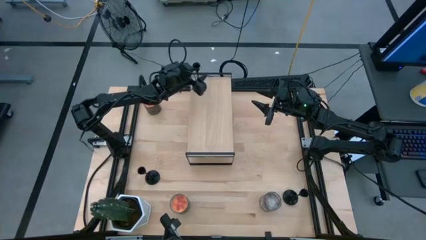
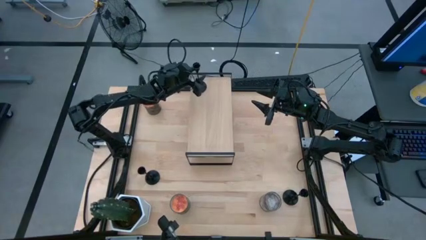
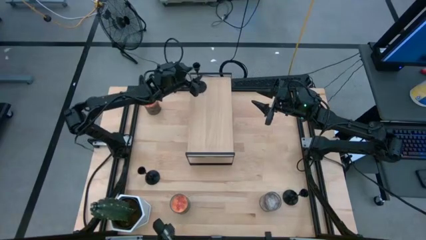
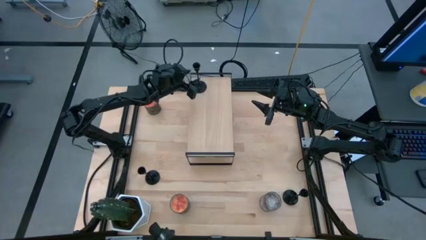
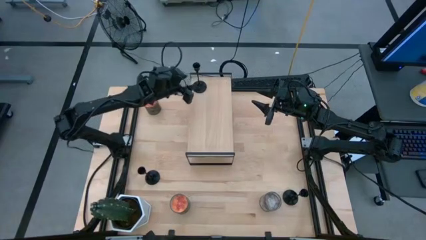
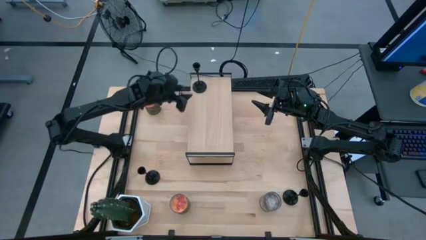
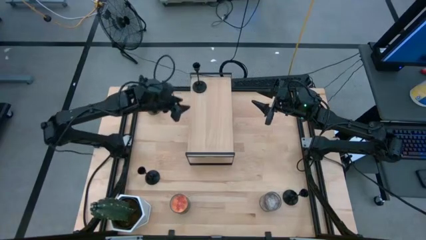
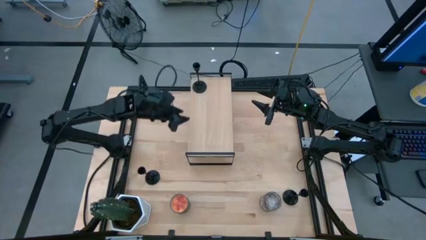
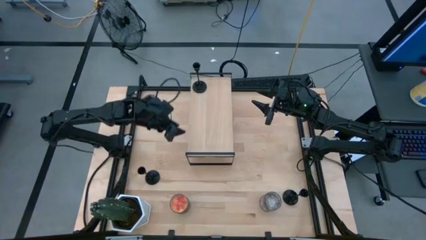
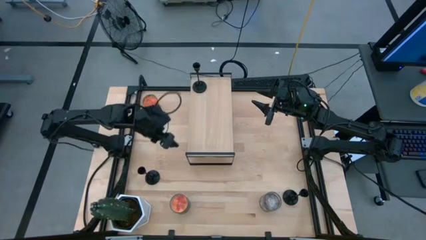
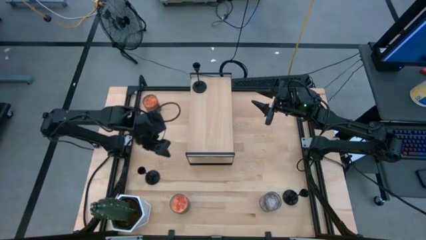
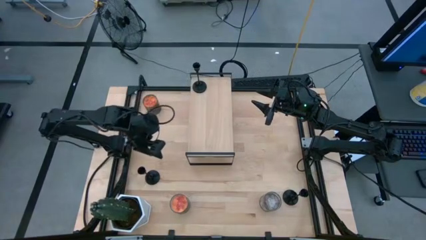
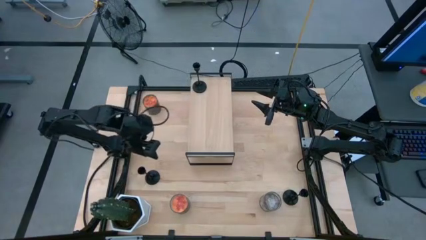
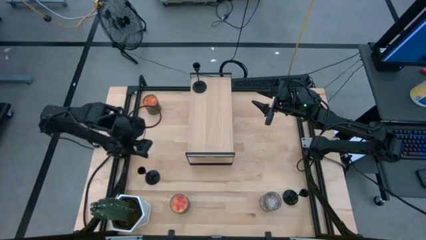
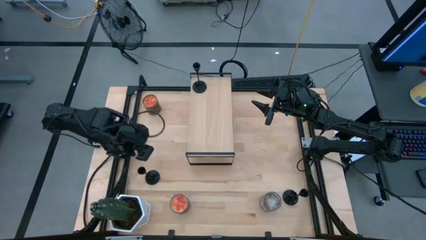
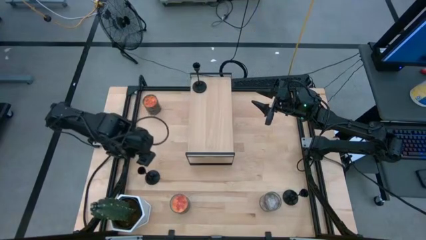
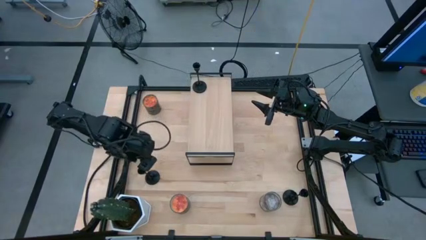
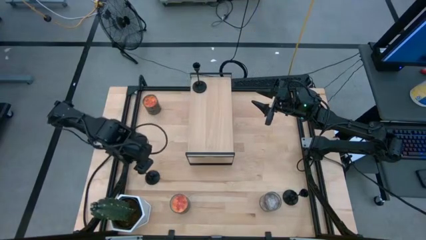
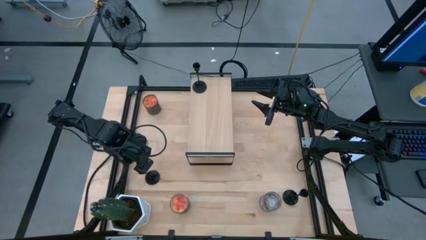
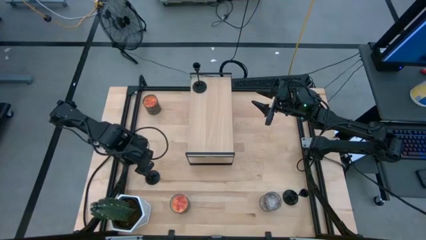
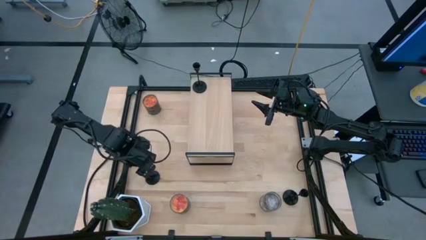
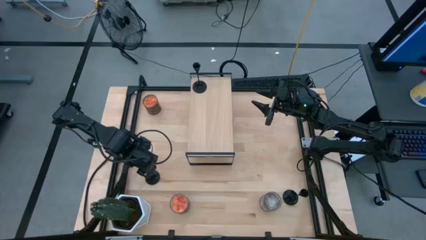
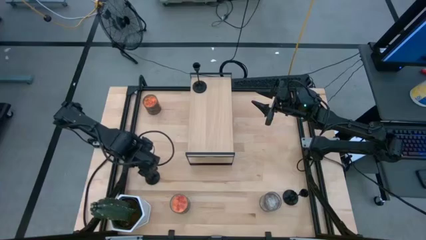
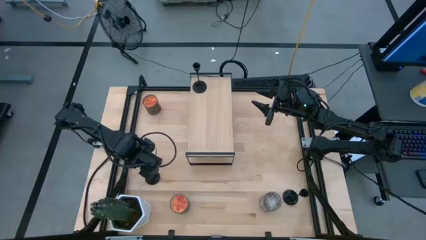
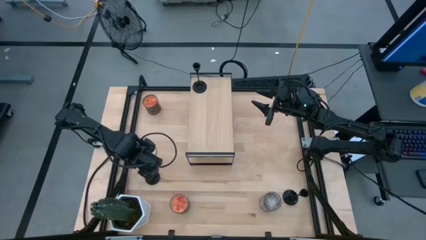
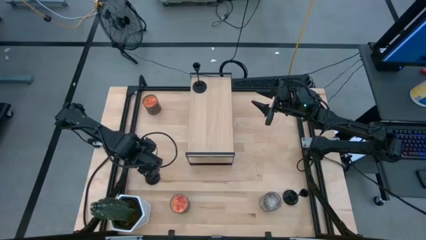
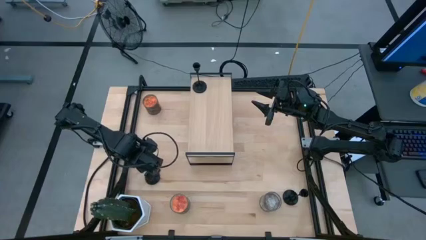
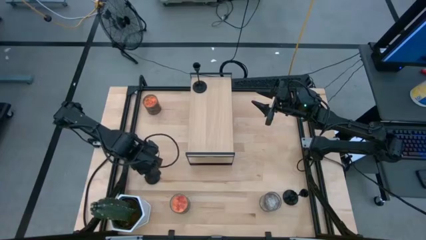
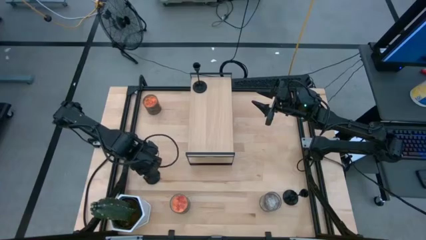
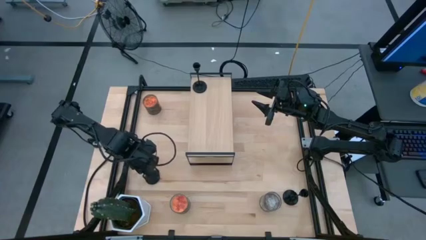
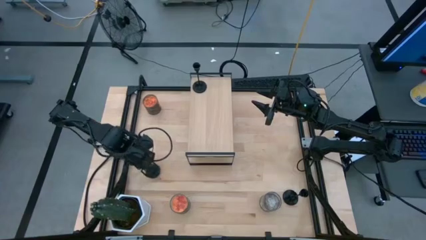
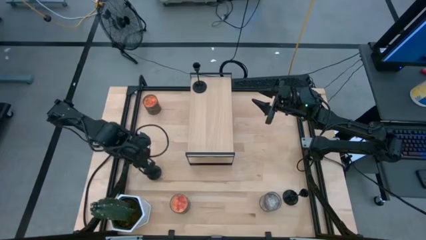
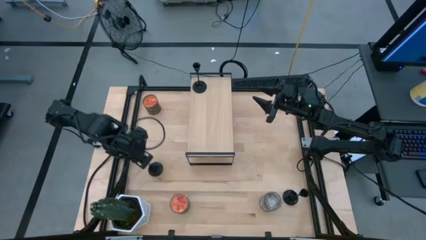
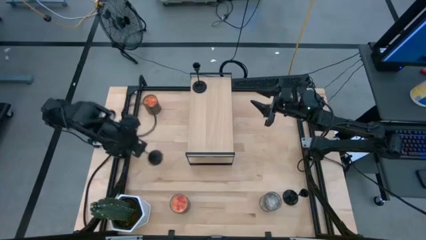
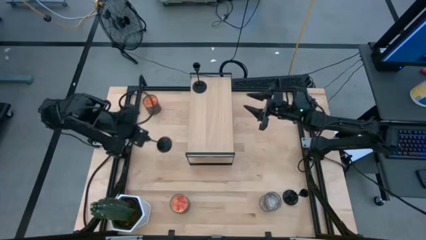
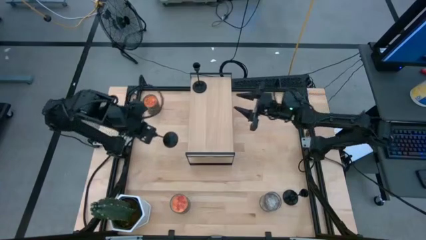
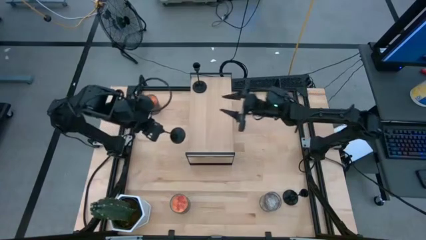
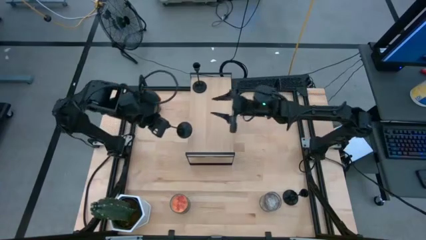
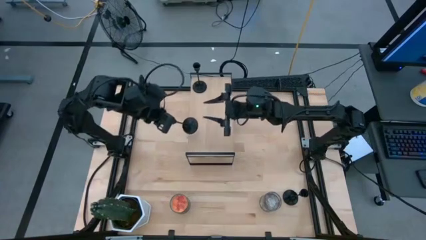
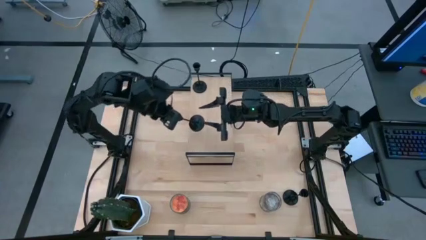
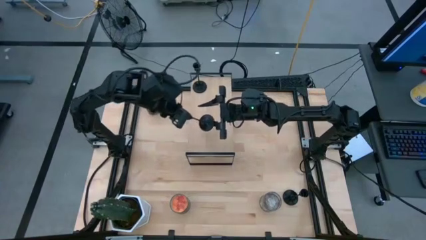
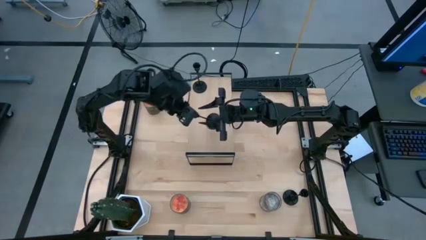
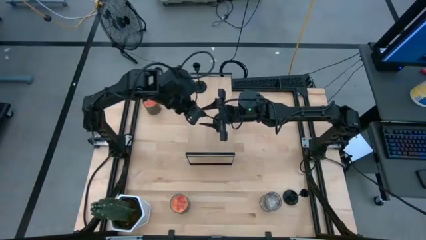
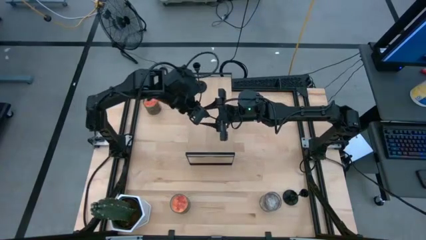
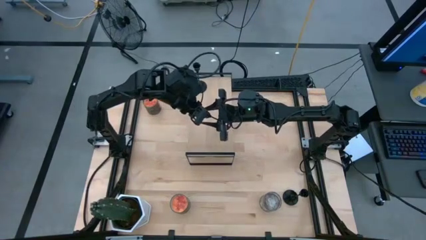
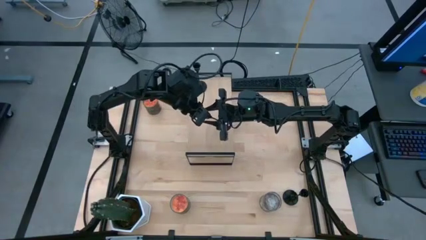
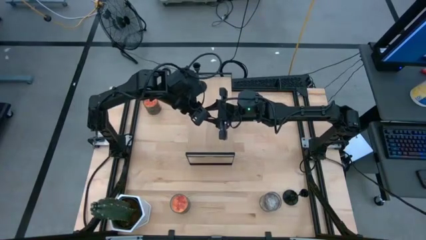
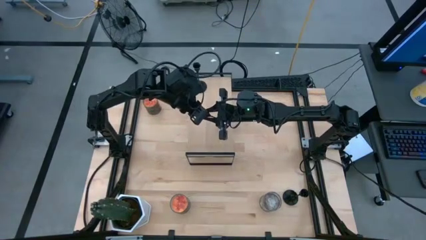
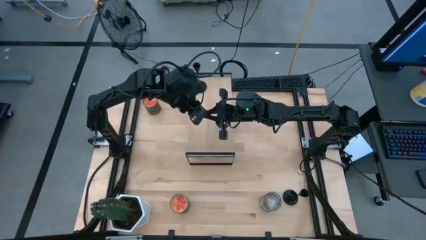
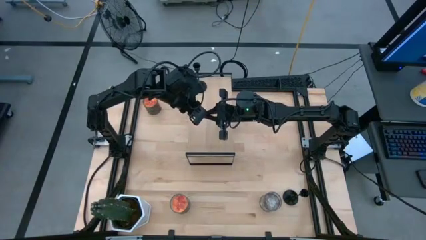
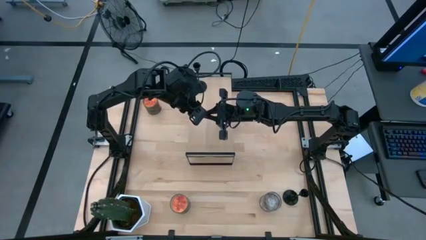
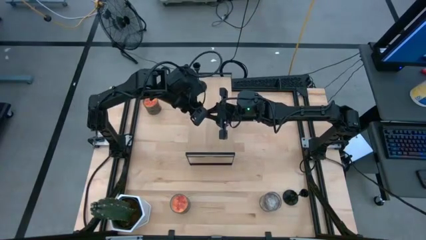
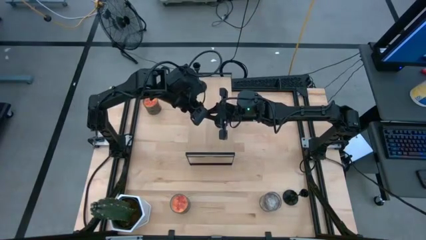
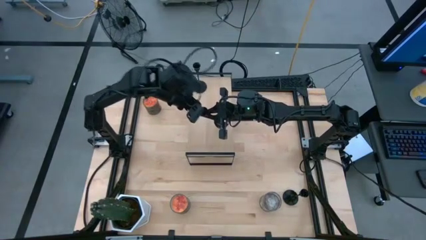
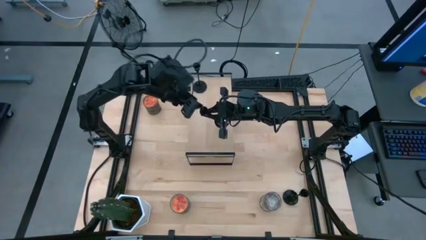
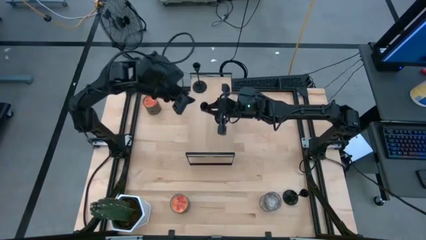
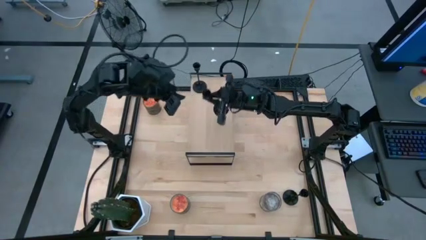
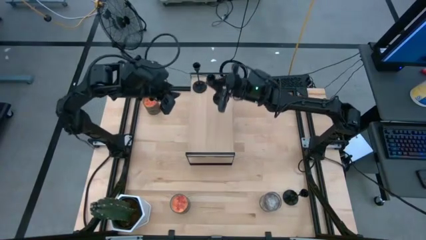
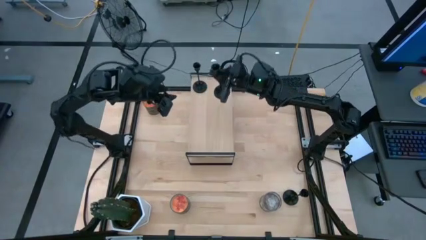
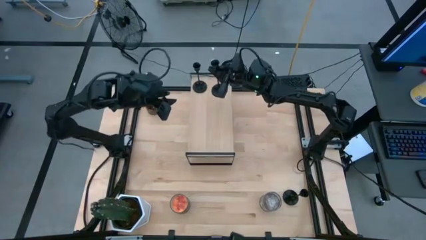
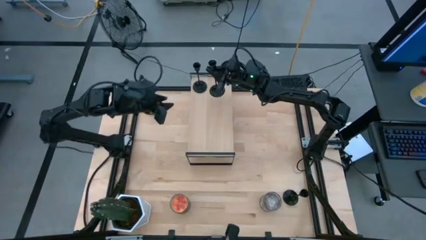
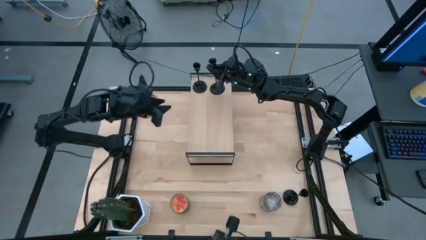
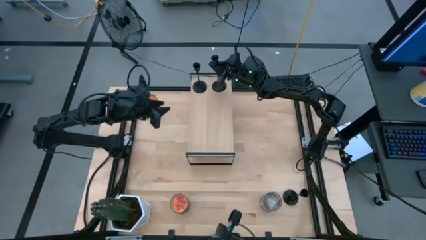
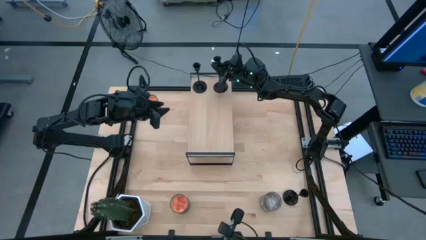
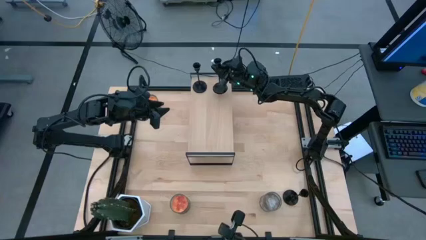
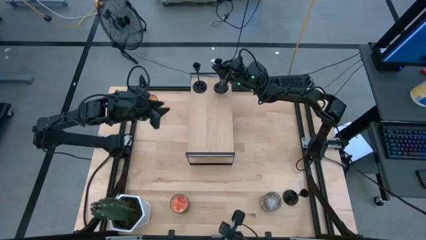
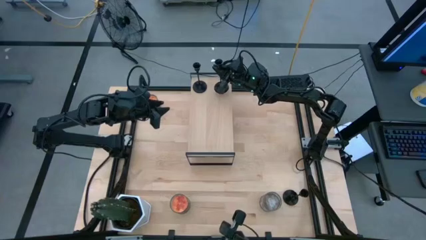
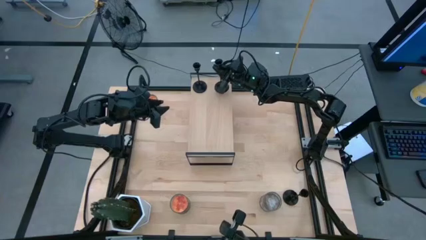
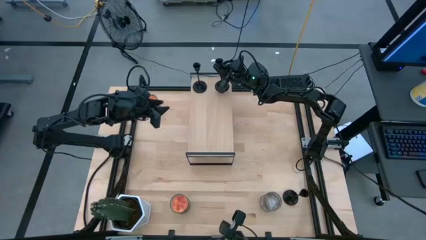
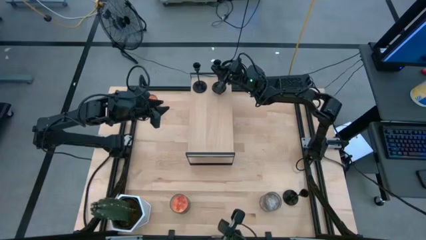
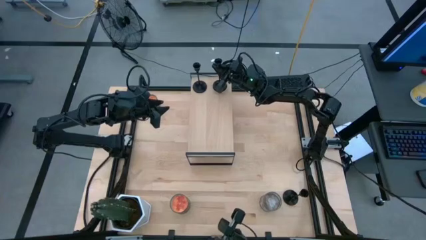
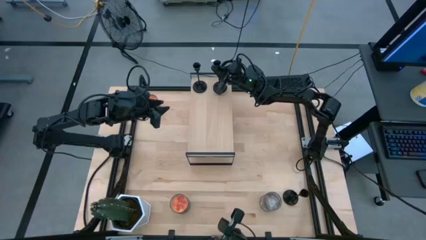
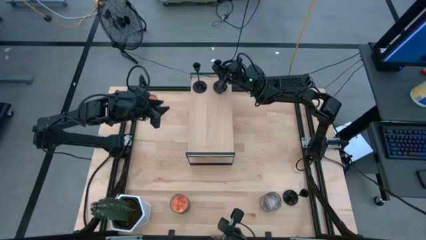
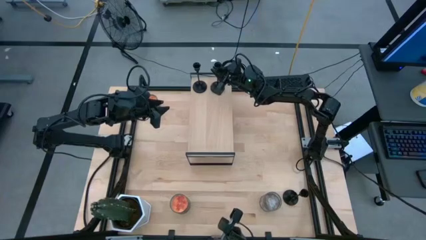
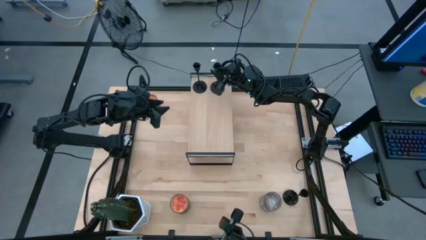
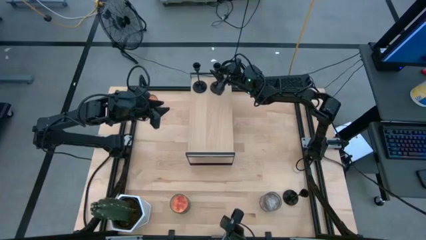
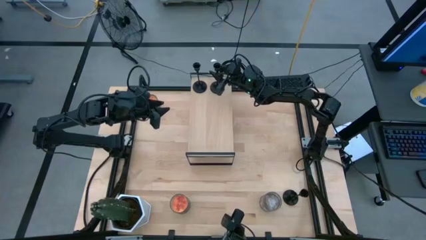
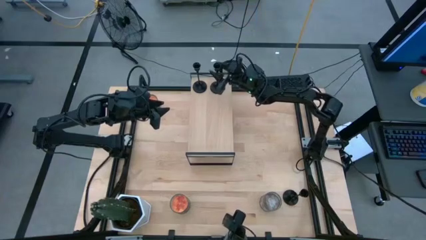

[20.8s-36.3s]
Task: Pick & Place candle stick holders
Put the left black candle holder on the shelf

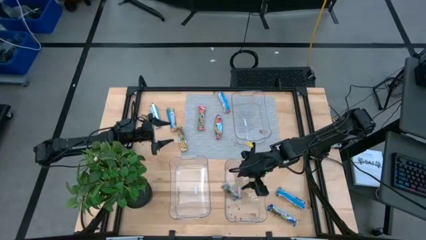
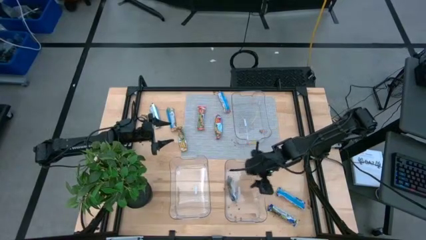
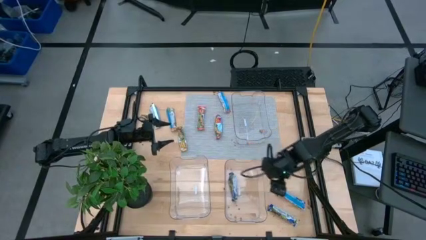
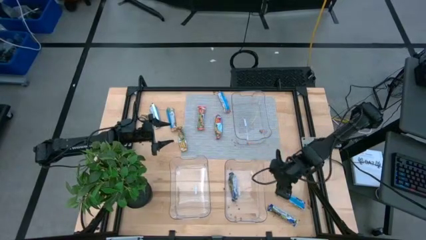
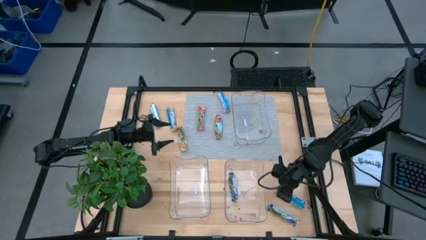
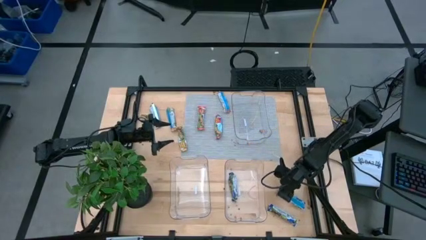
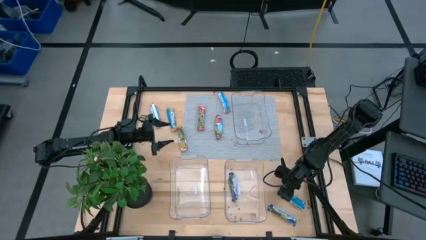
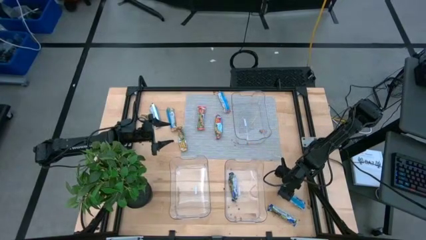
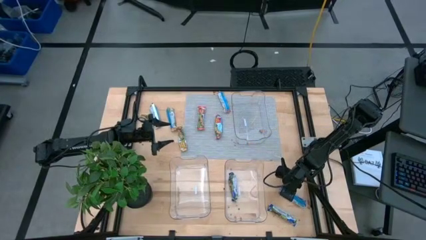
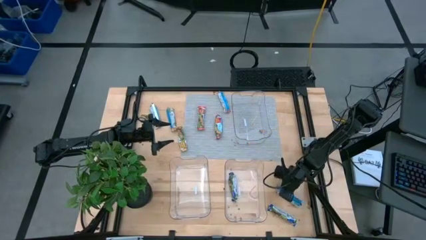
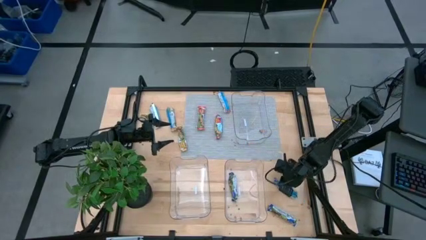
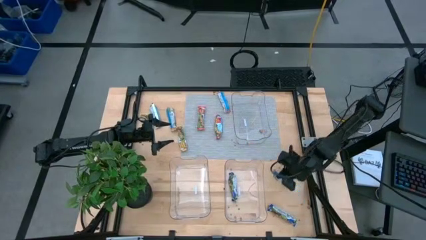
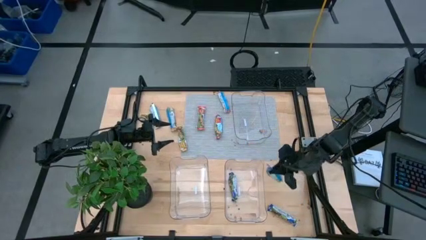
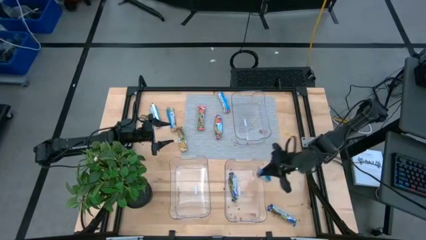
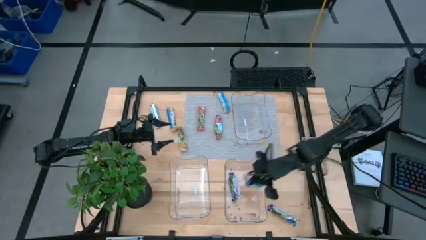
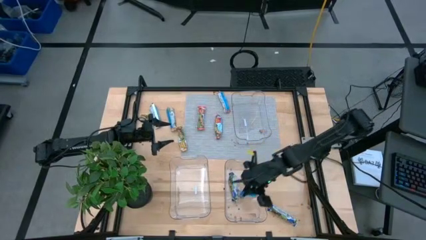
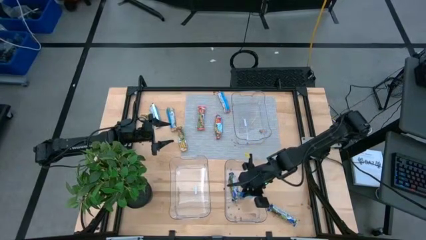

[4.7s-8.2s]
Task: Pick and place Granola Bars by type
Put the top blue granola bar into the bottom right transparent bin
